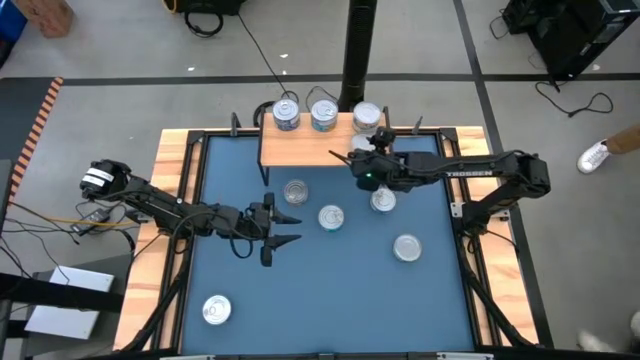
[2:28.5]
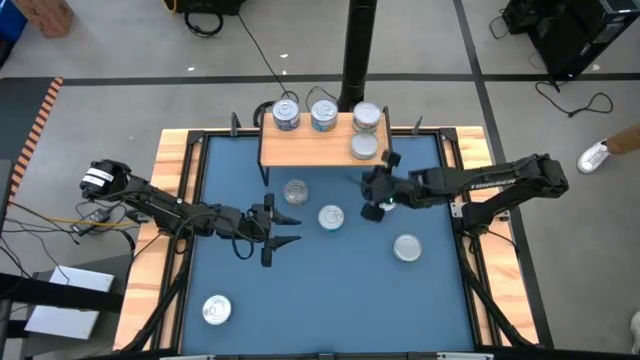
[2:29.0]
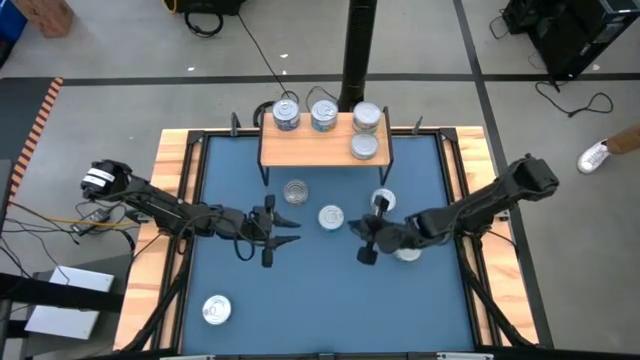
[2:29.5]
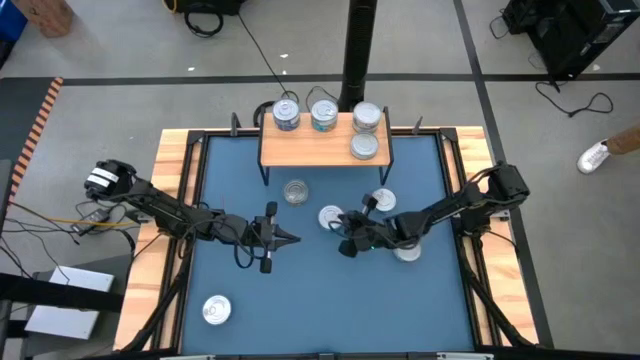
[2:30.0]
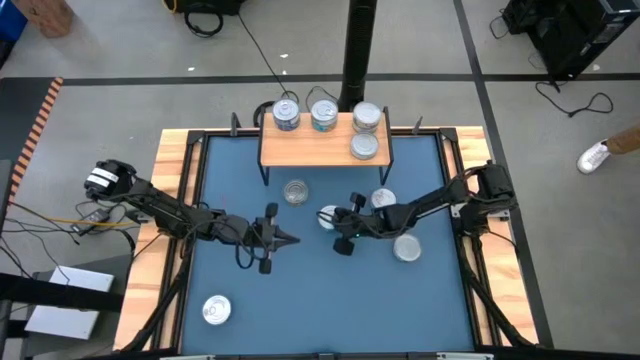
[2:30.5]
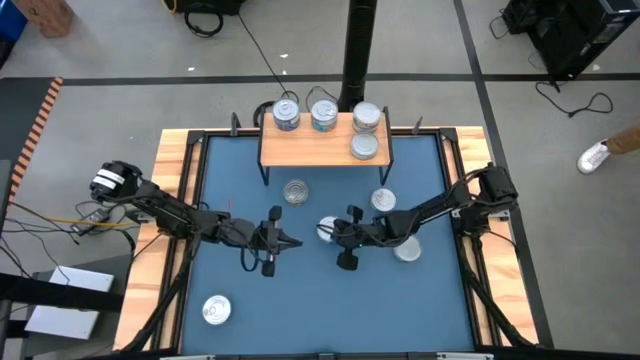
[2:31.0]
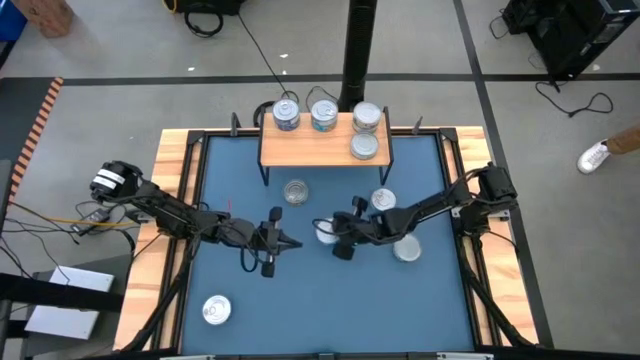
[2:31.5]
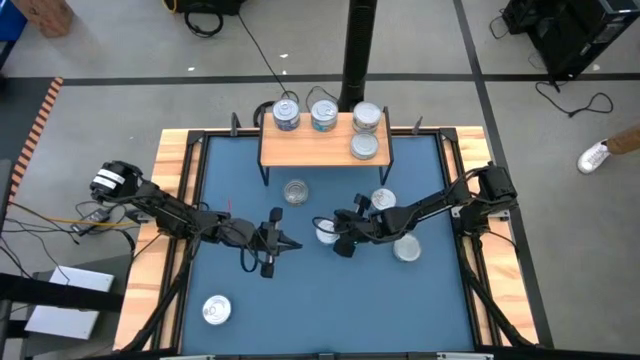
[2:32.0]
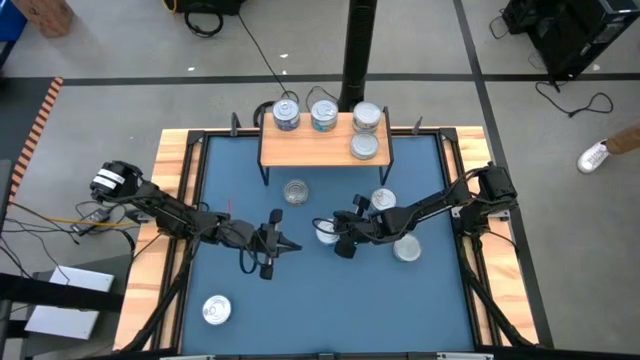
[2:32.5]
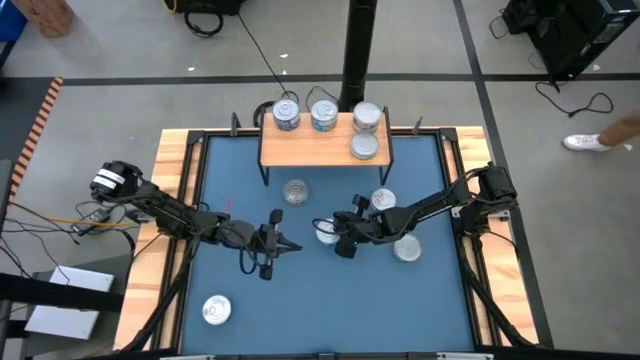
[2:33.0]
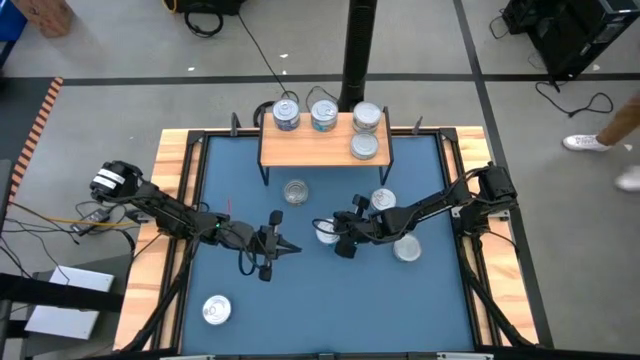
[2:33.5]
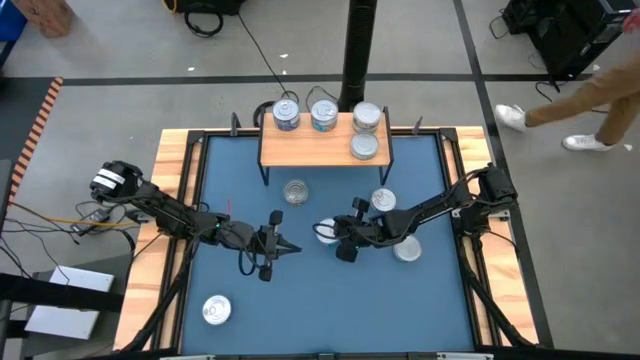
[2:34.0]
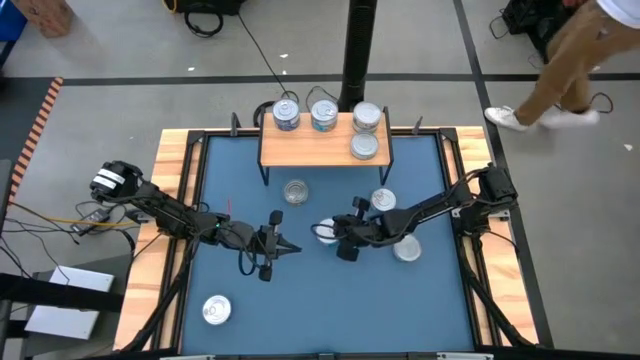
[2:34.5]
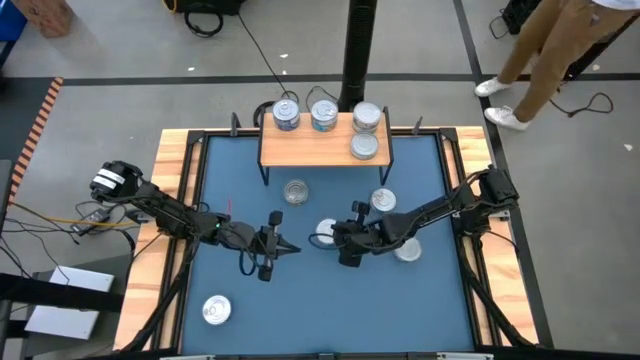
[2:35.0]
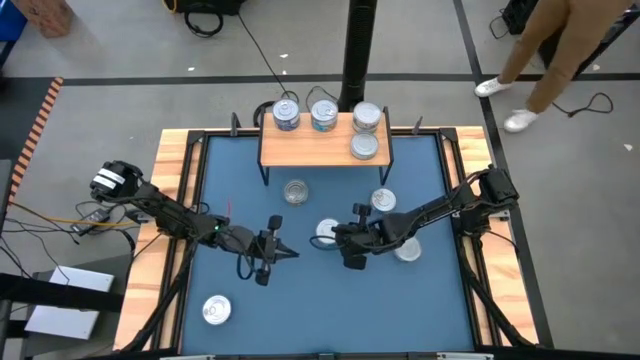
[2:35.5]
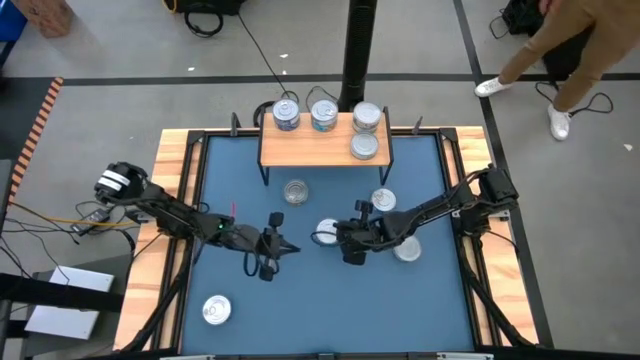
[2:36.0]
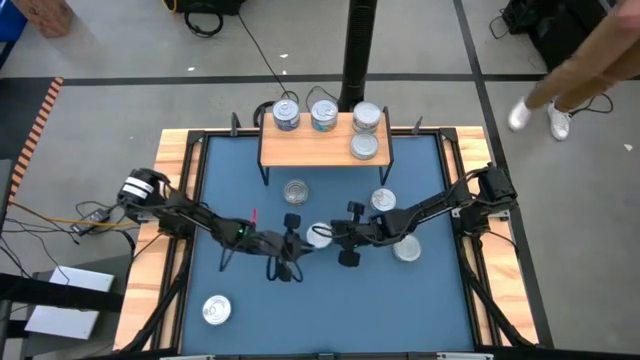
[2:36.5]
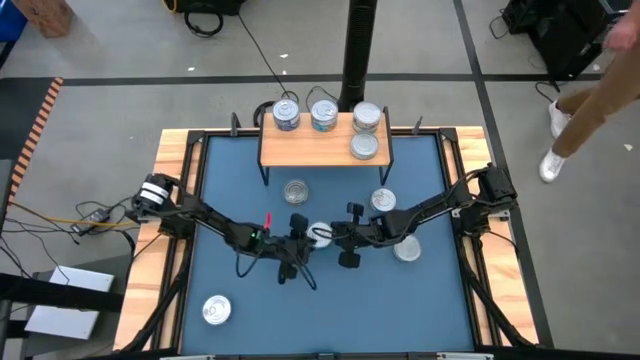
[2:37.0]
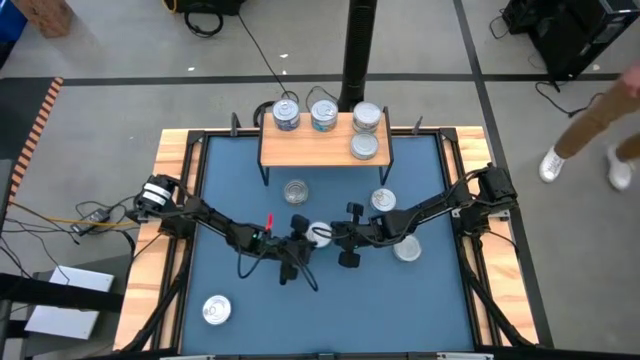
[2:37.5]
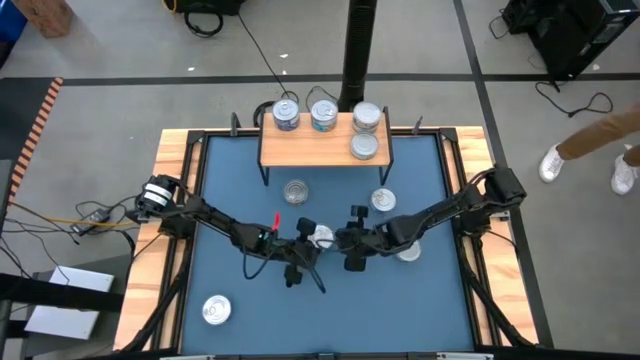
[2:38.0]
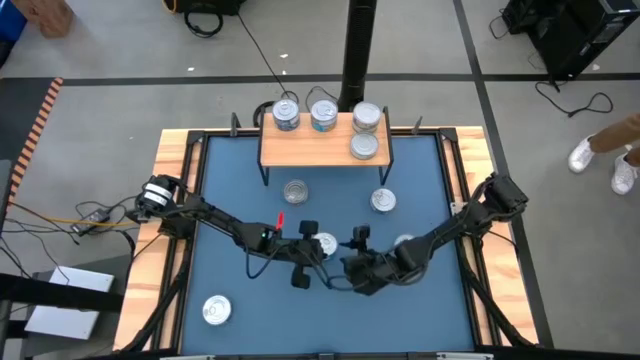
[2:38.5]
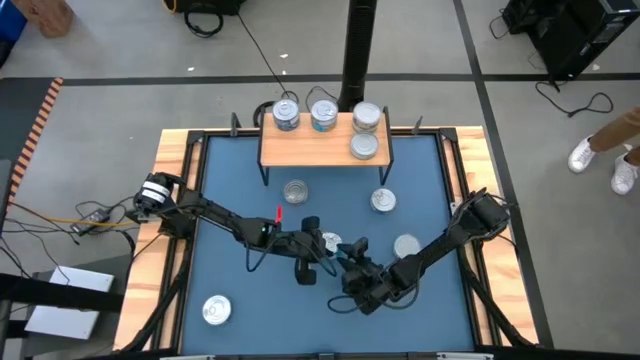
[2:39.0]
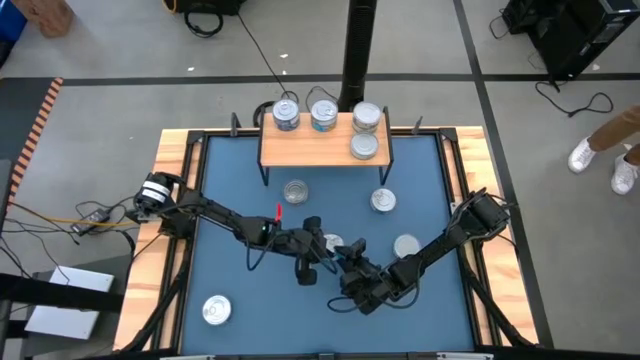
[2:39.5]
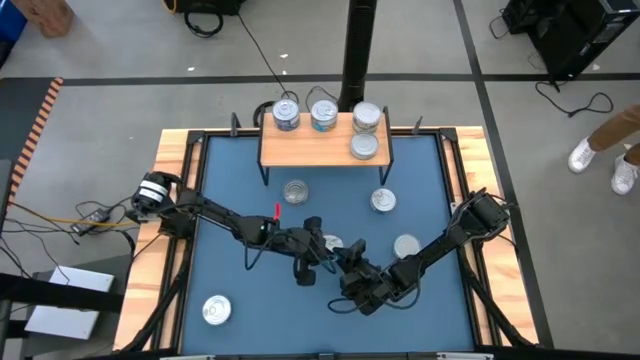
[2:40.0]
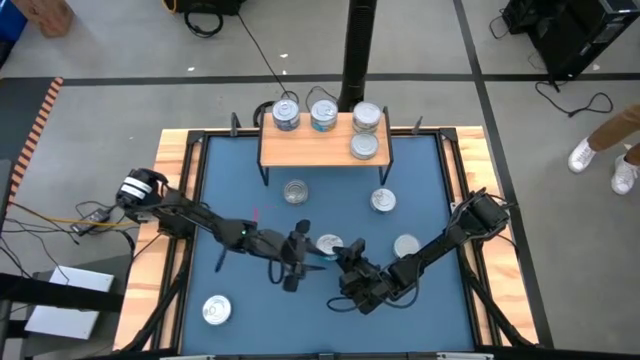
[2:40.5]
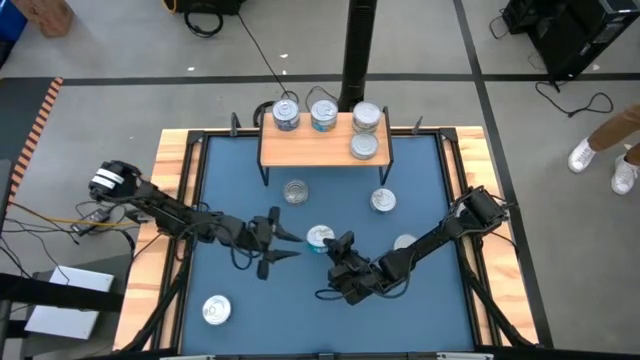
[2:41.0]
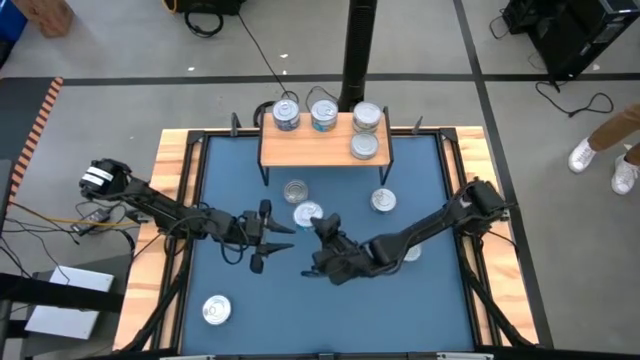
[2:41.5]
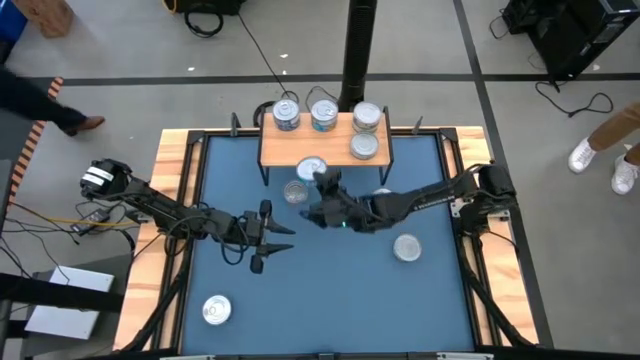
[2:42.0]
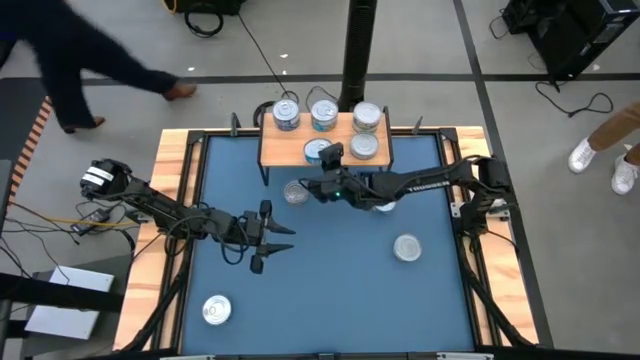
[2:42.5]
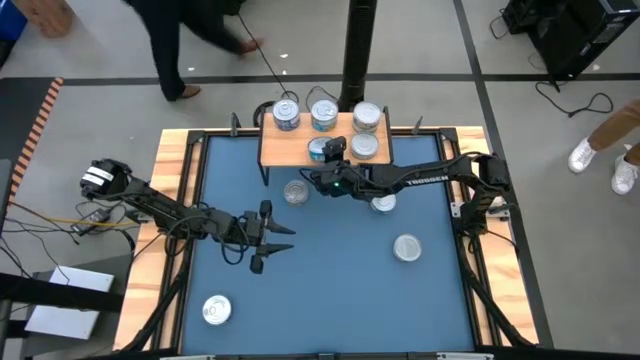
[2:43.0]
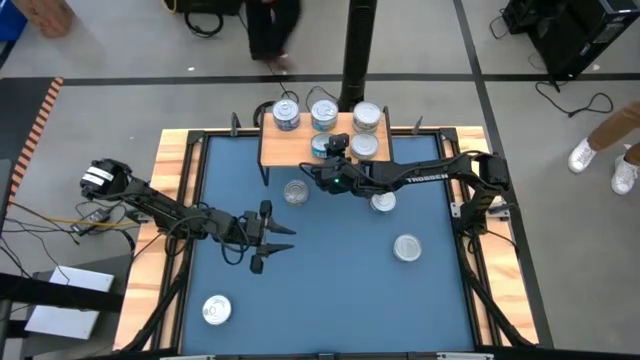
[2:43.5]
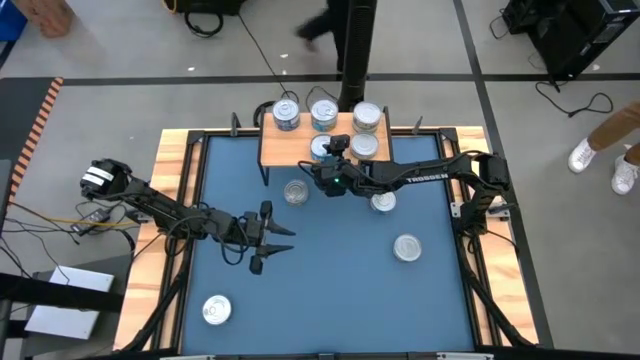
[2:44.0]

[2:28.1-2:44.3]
Task: Stack canned seafood by type on shelf
Put the light blue tuna can on the shelf aligned with the other light blue tuna can

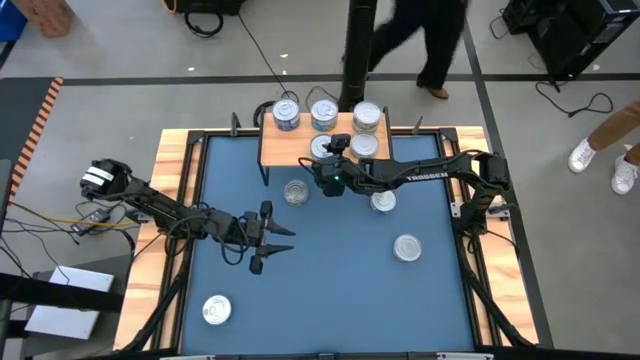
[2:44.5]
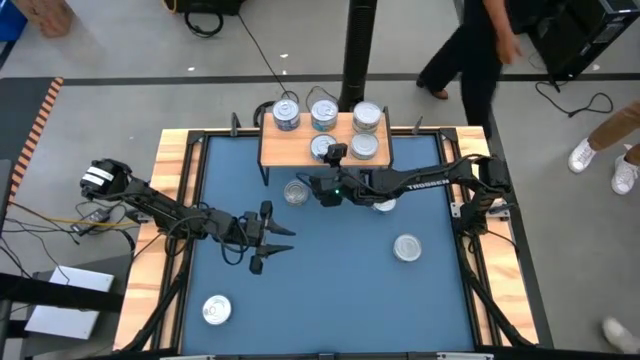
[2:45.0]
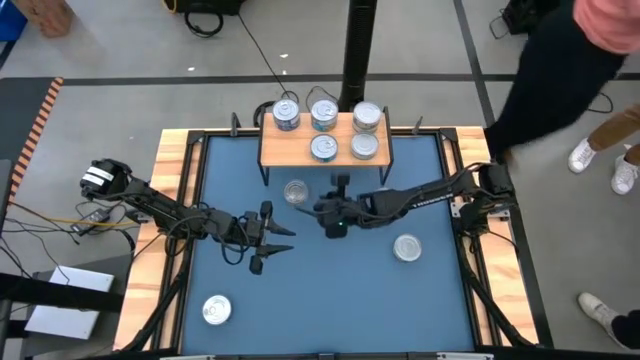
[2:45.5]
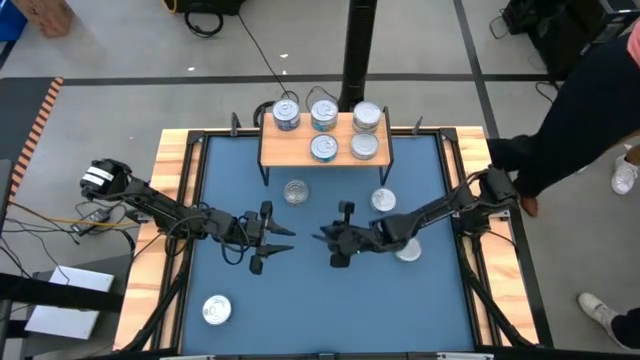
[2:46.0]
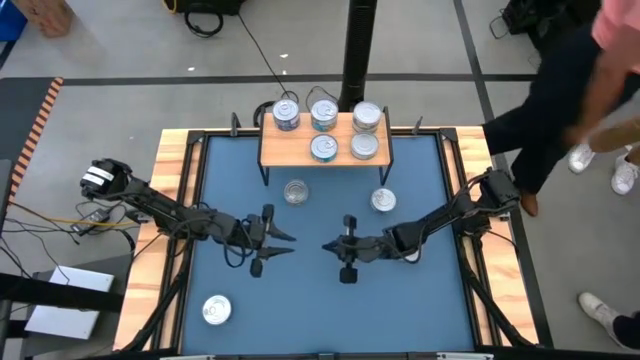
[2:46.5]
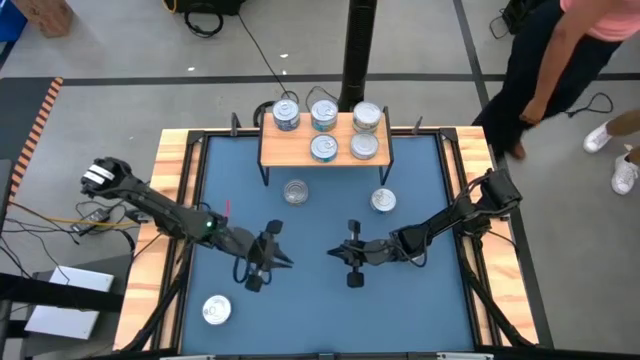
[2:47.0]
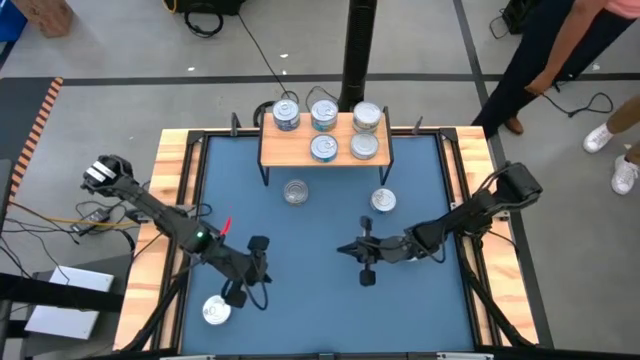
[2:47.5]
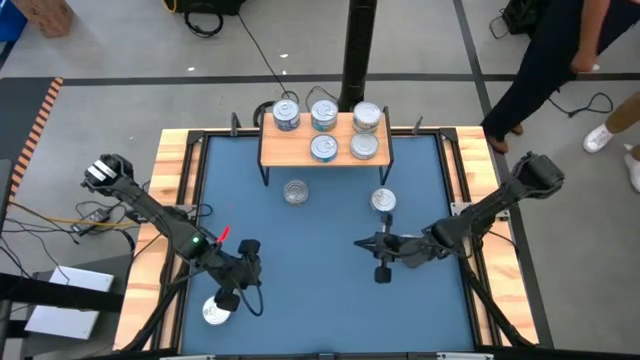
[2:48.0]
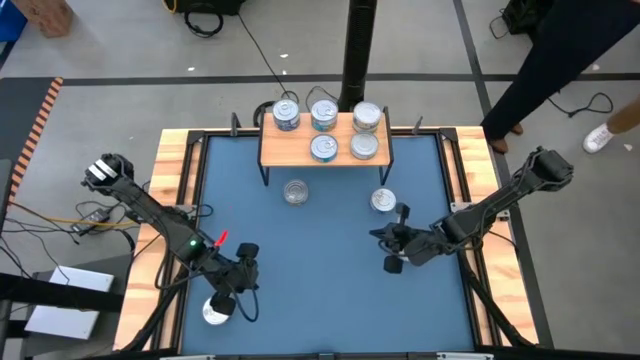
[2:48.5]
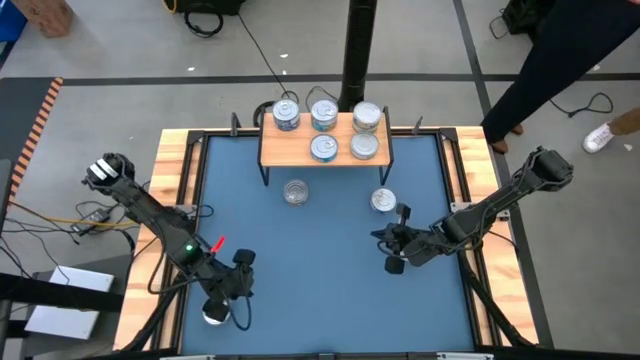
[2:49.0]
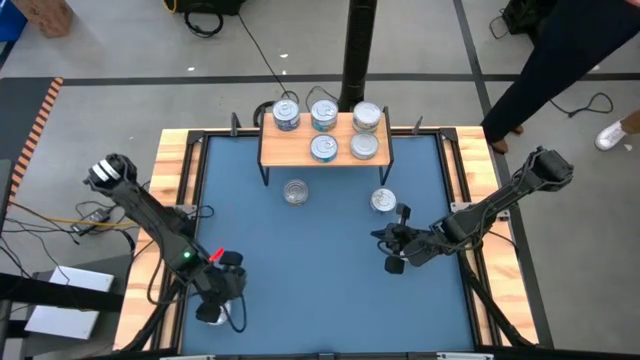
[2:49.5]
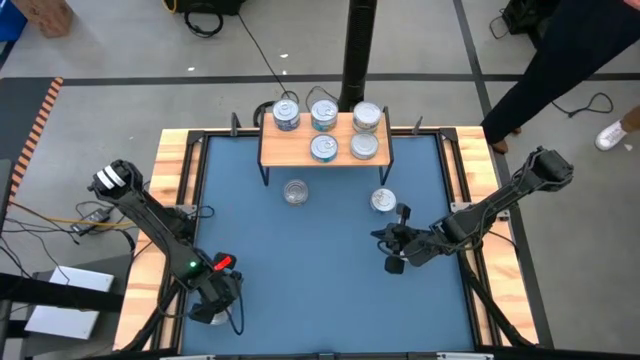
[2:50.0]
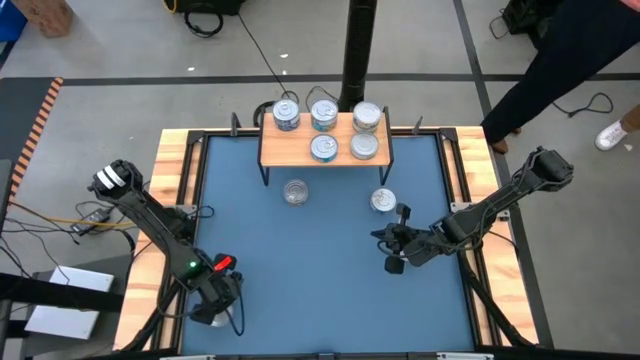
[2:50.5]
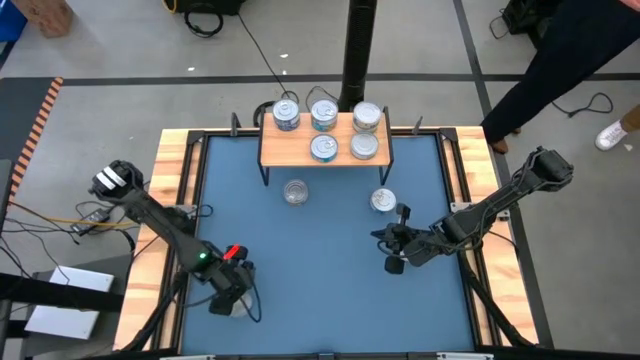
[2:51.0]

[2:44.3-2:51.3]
Put the blue tuna can on the shelf aligned with the other blue tuna can
